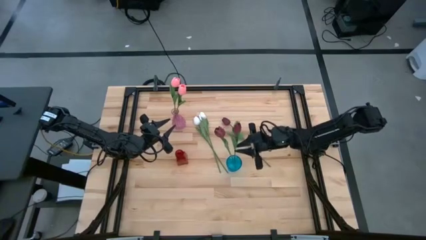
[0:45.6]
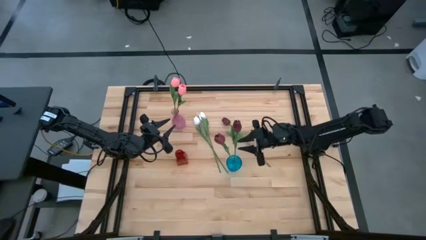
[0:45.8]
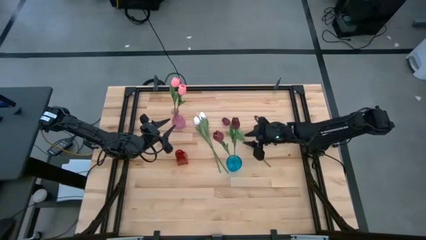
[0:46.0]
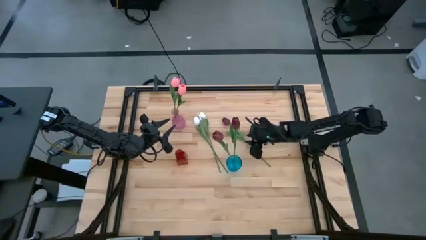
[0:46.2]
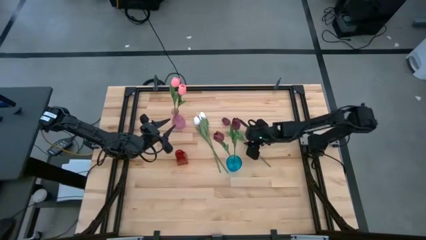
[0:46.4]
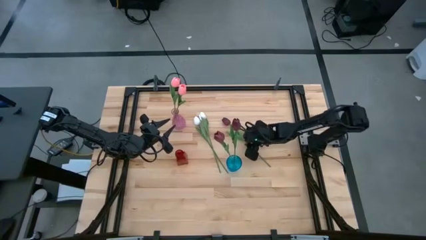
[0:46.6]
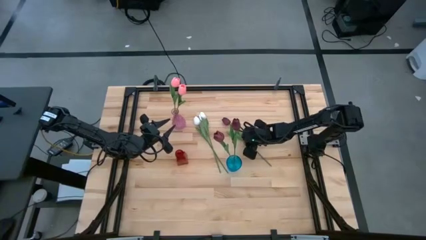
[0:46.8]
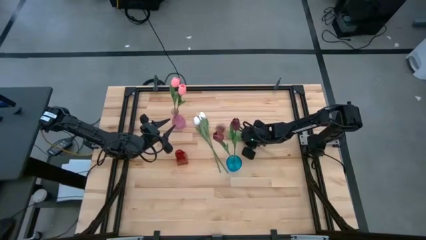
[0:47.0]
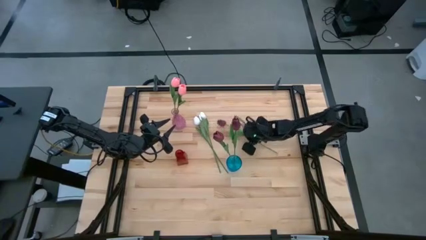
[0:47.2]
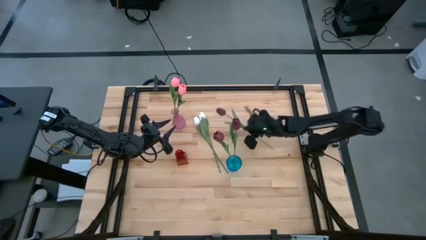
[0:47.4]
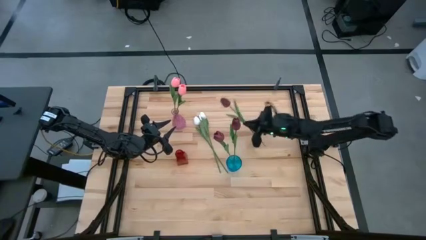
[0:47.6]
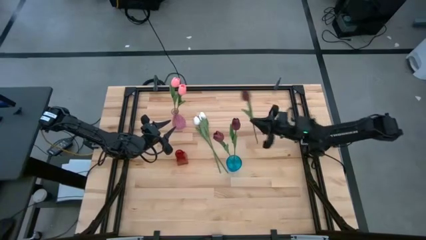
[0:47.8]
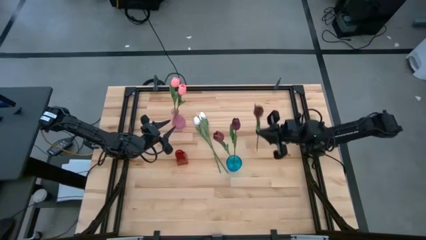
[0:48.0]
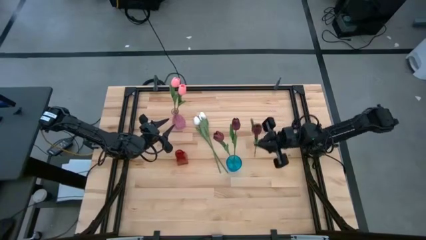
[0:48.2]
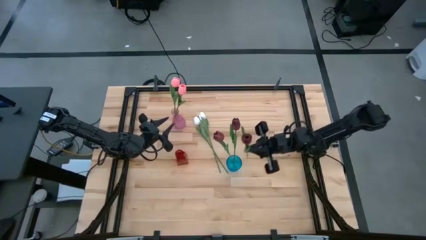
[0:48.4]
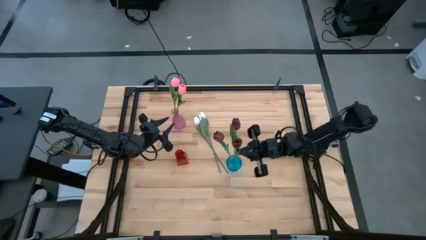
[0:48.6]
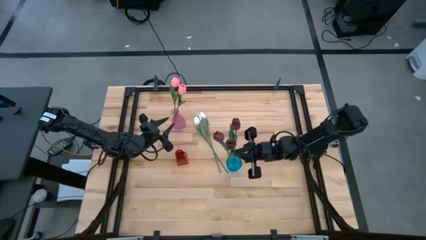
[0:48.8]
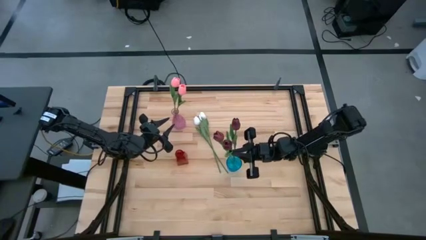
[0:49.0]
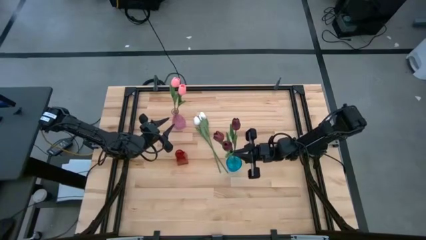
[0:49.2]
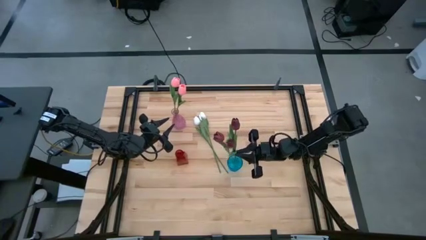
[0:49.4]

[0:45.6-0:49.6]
Task: Sort flowers into vase by color
Put the red flower into the blue vase

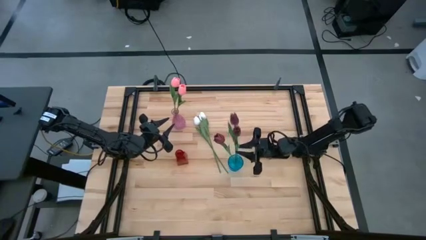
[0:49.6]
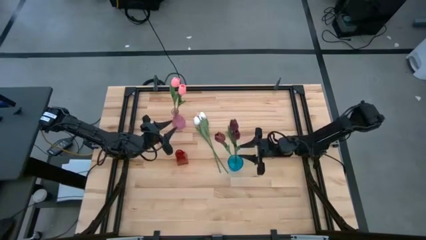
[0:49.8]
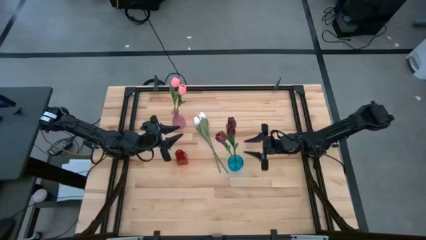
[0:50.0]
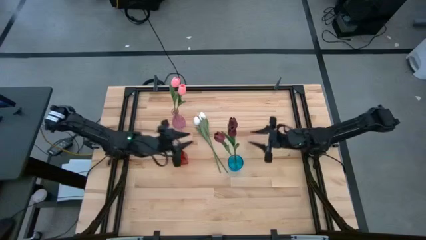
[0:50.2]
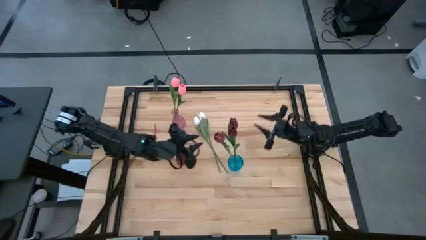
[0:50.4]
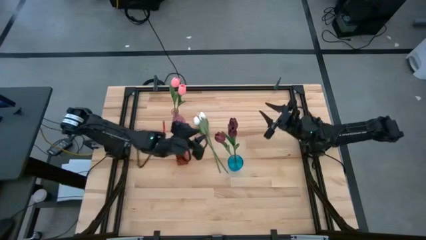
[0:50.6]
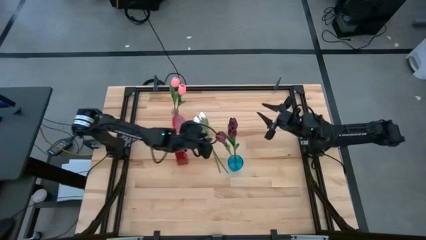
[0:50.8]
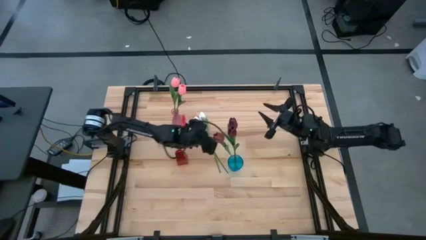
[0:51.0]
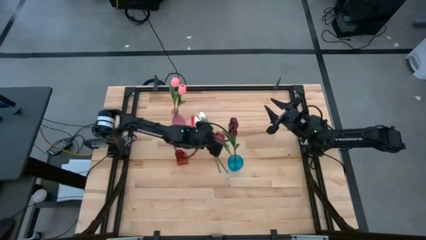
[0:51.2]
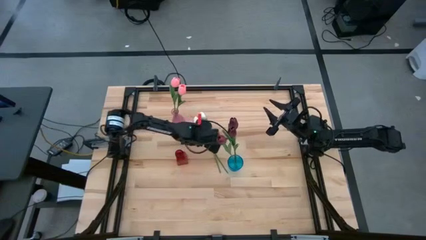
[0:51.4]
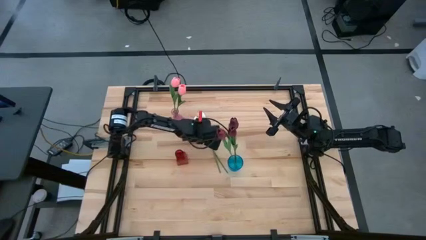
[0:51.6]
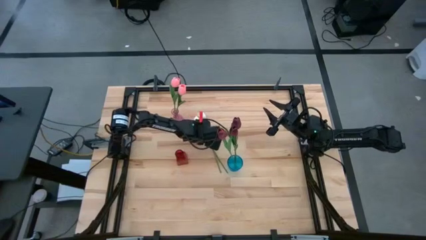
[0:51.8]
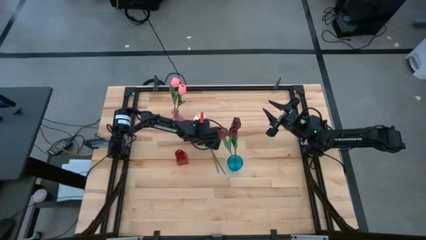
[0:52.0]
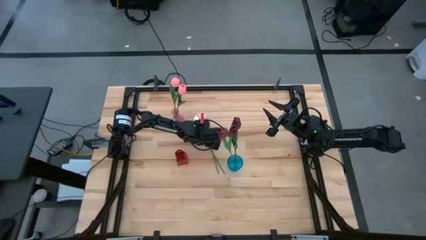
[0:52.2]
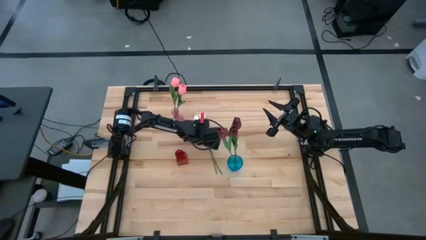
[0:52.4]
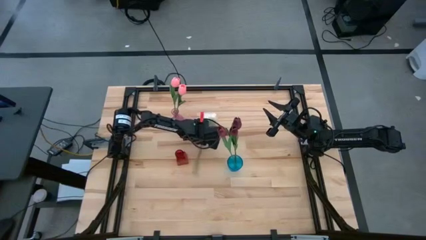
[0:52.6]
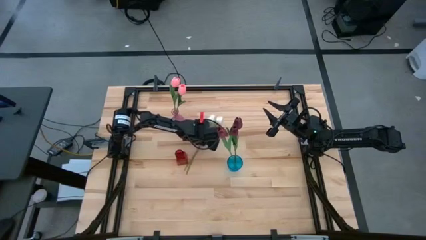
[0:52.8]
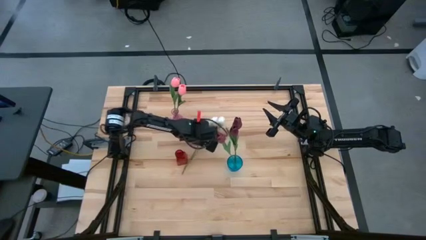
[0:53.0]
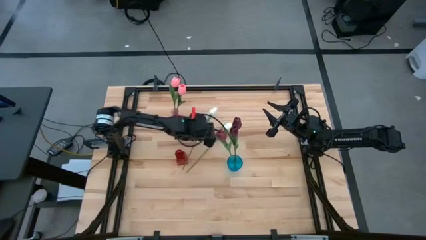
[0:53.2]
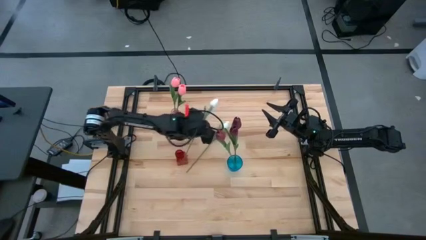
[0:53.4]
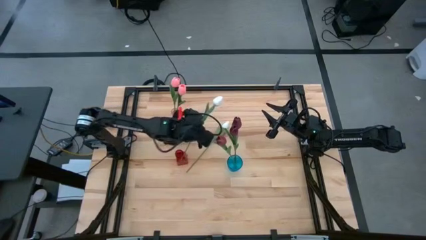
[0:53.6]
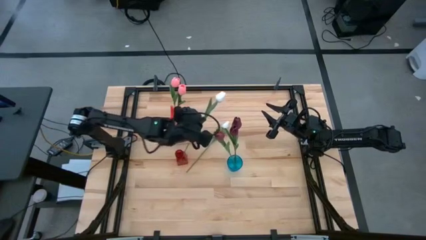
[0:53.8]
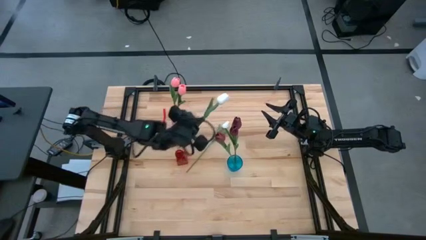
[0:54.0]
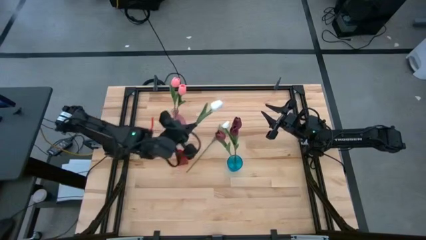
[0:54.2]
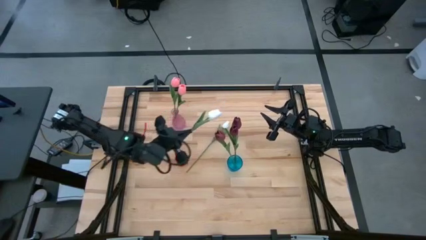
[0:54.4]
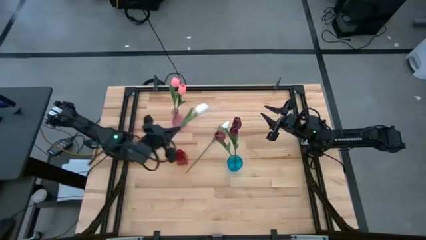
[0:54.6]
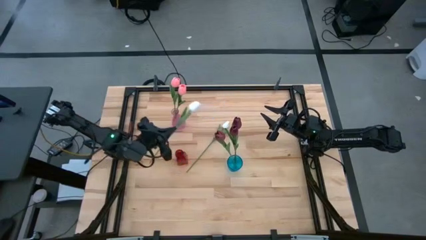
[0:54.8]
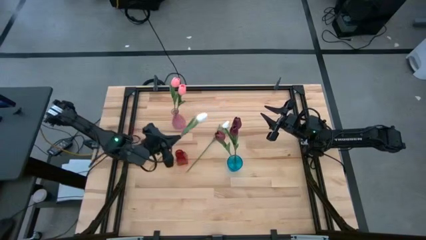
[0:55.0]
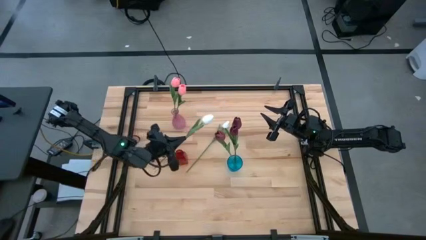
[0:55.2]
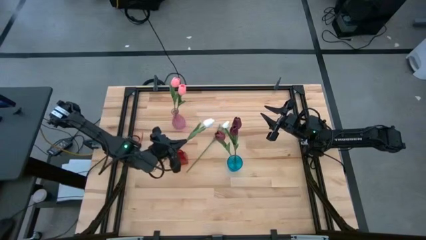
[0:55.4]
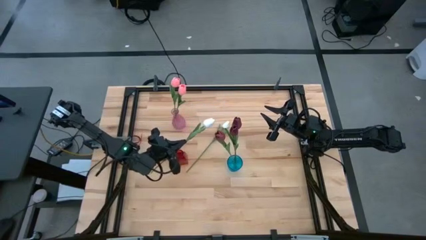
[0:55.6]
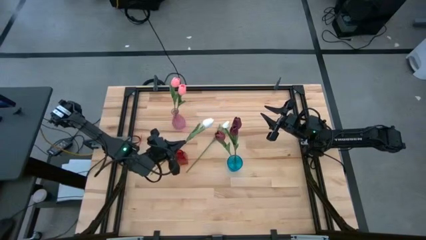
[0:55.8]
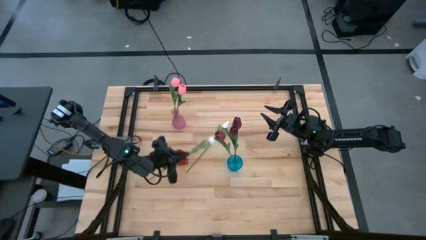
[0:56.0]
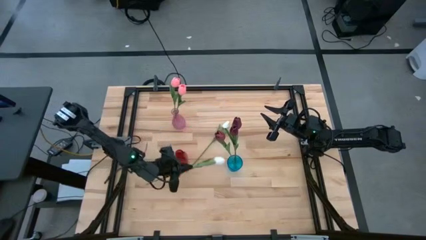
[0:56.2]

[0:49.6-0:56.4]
Put the left white flower into the red vase

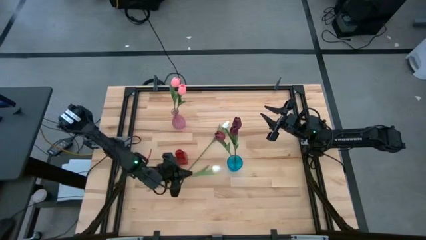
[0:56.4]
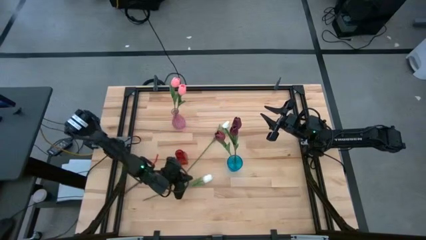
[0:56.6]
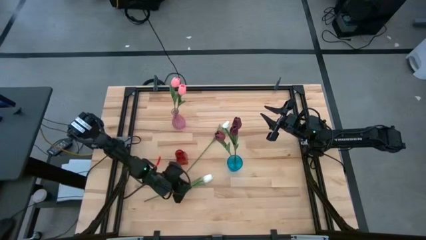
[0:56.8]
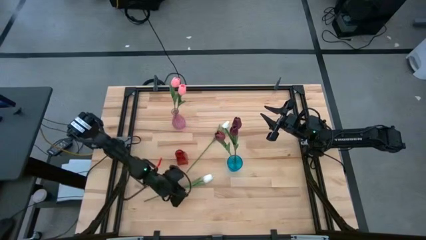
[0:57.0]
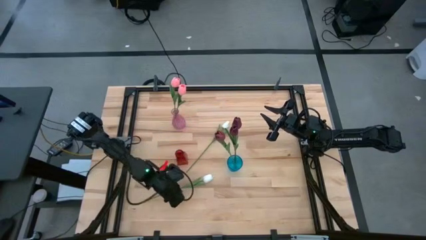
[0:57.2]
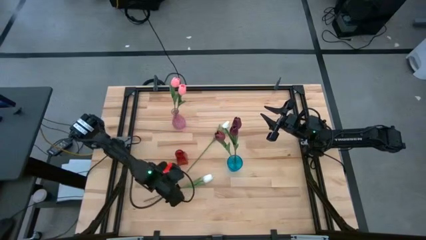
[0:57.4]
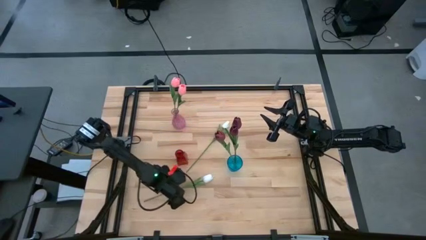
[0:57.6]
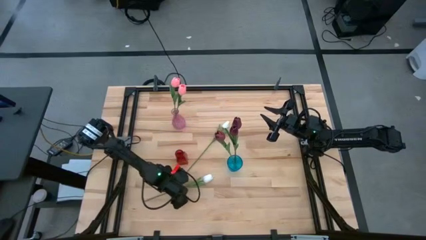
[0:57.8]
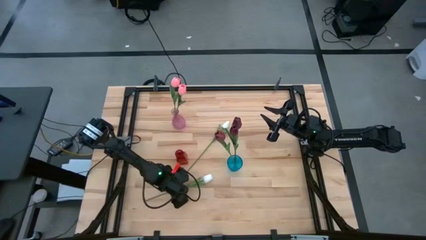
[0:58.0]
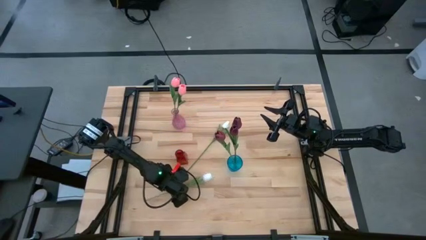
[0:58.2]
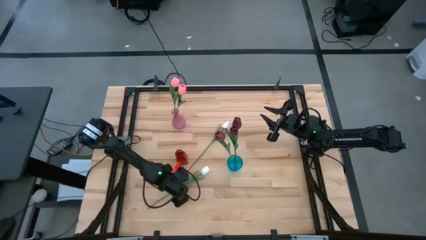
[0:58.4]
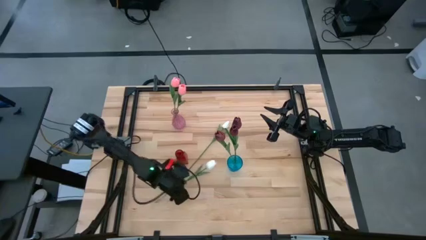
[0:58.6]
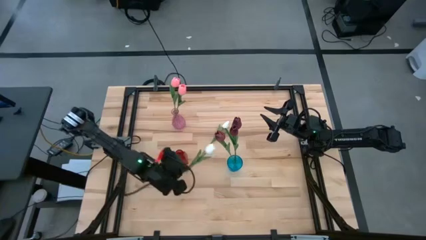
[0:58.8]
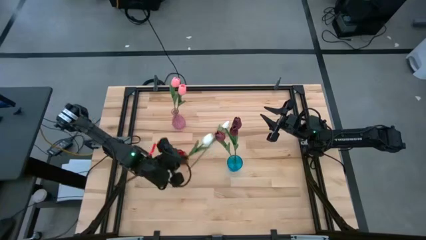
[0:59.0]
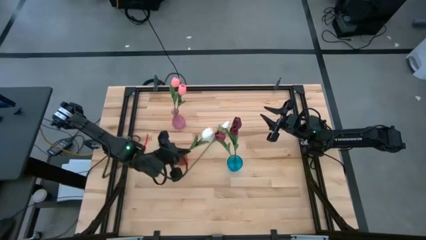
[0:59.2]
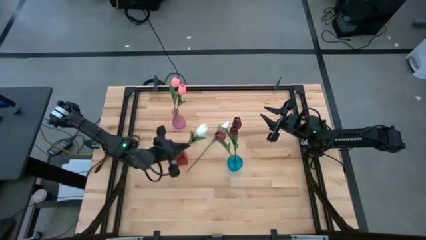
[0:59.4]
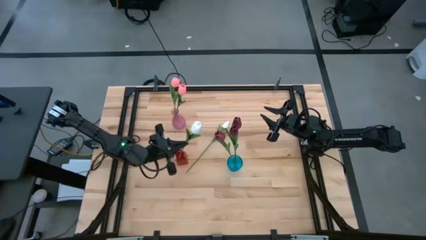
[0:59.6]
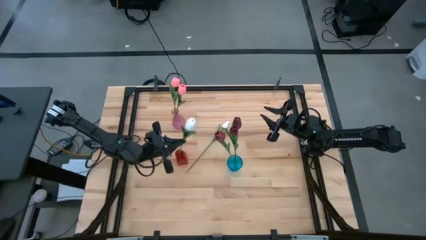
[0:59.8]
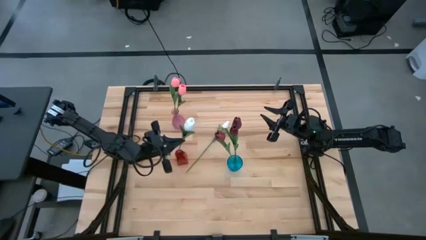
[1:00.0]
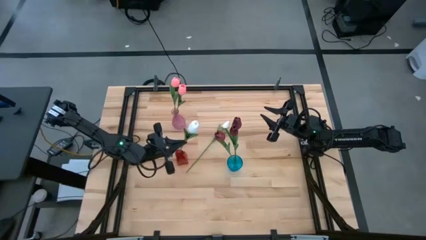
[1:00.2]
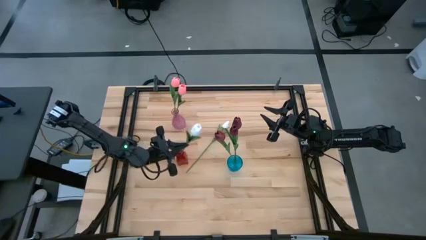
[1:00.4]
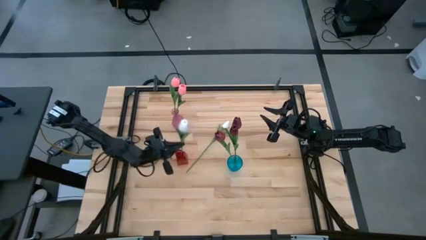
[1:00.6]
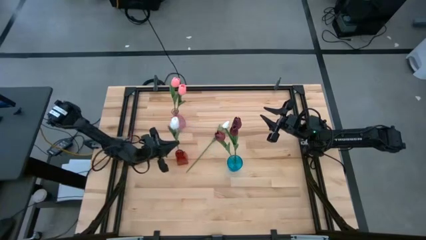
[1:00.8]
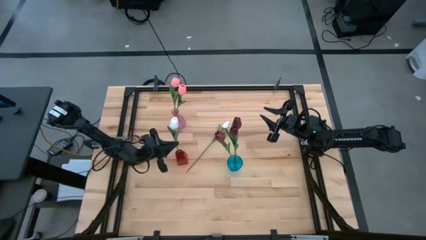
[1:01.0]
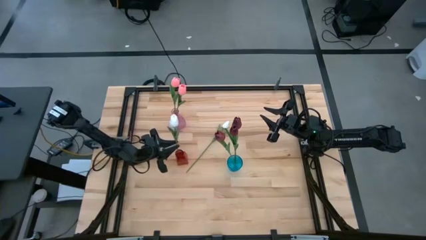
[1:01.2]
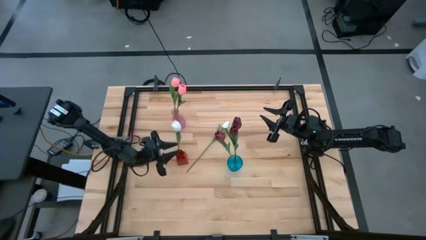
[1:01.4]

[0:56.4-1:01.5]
Put the bottom white flower into the red vase

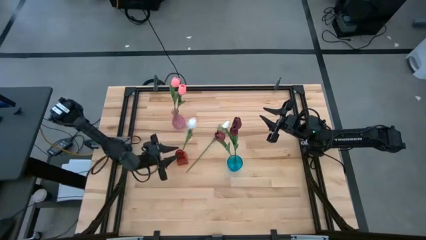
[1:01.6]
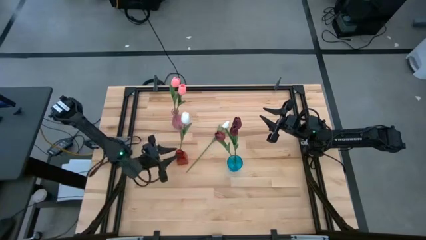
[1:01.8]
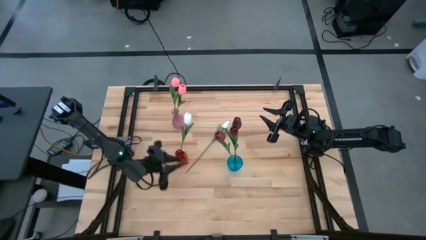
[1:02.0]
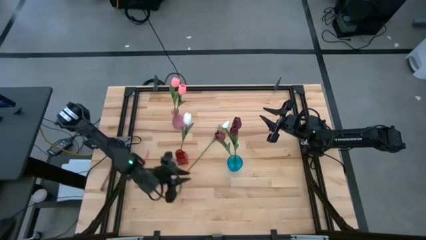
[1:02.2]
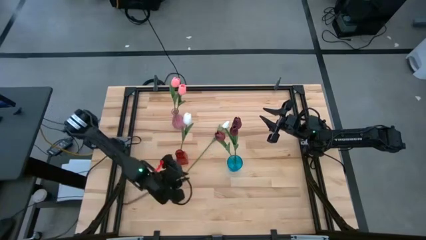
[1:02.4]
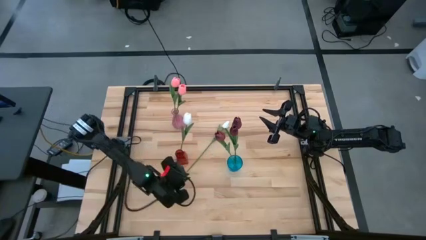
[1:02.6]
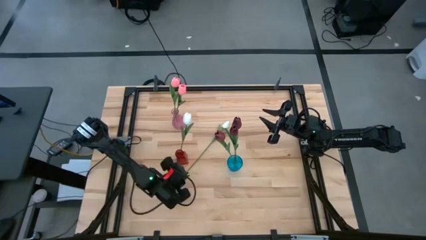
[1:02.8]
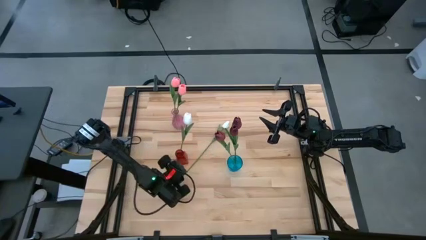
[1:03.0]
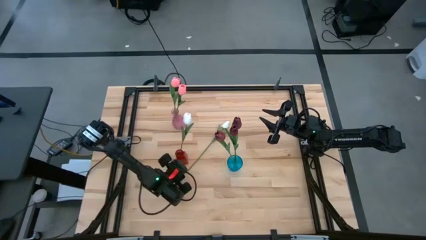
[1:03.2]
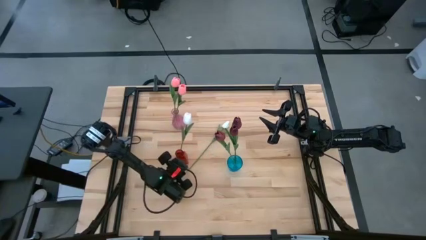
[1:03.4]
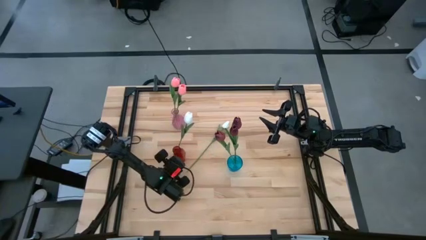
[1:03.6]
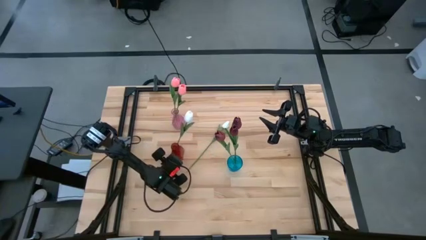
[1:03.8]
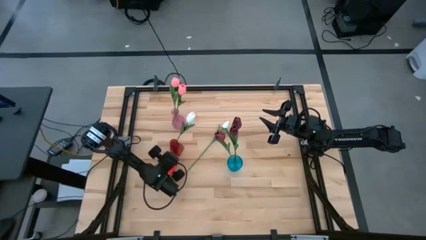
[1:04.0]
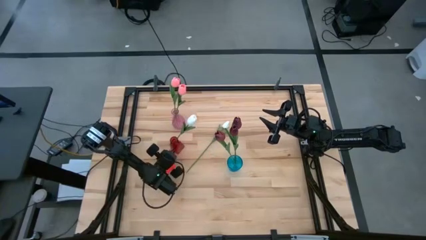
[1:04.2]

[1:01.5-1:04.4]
Adjust the red vase
